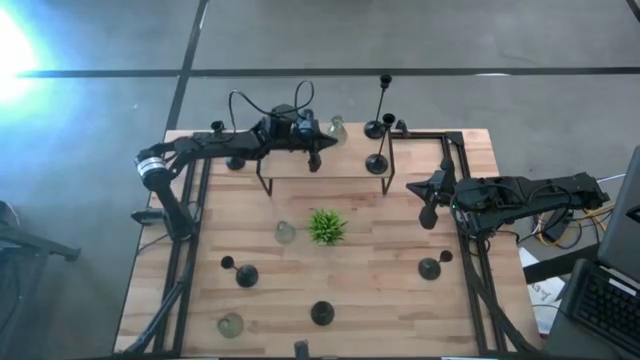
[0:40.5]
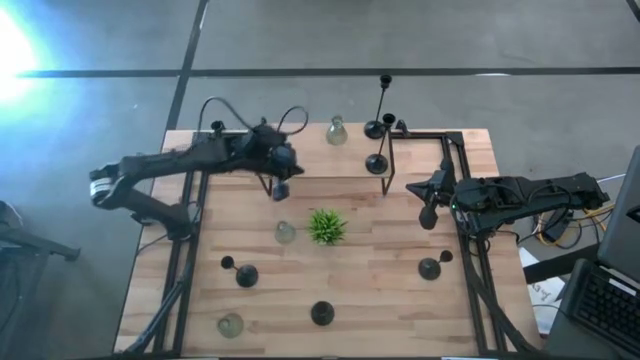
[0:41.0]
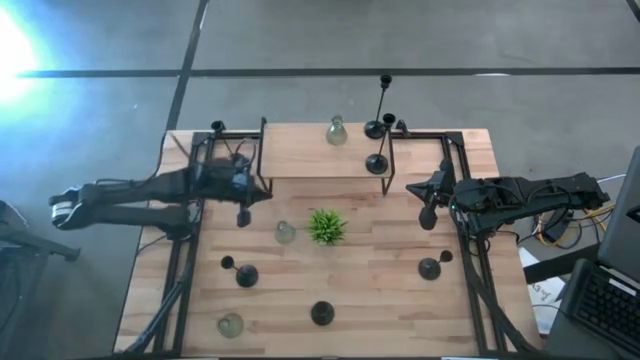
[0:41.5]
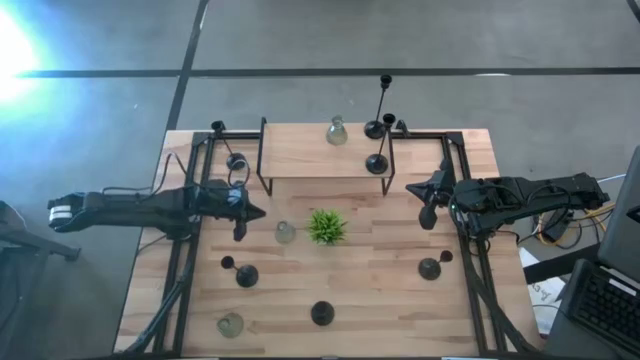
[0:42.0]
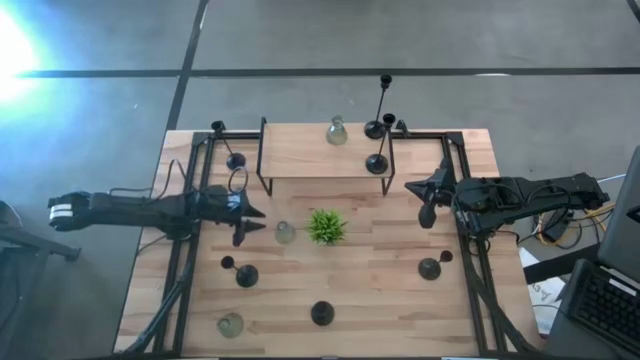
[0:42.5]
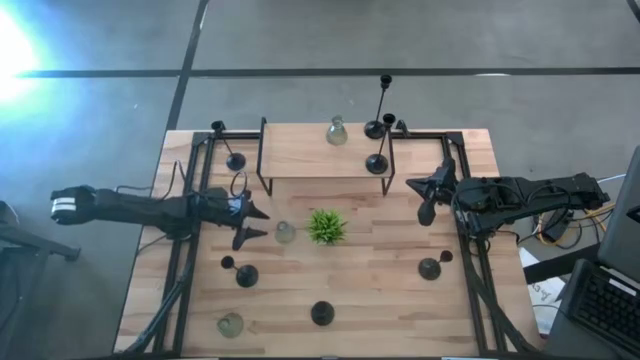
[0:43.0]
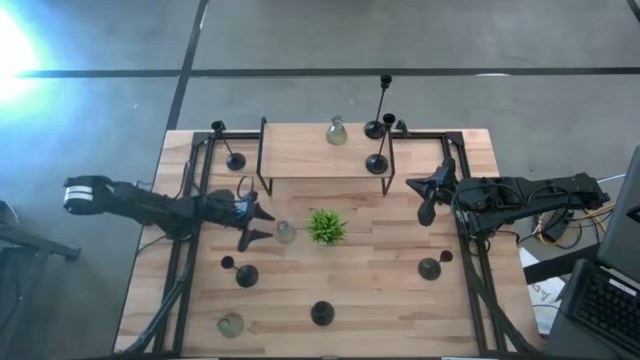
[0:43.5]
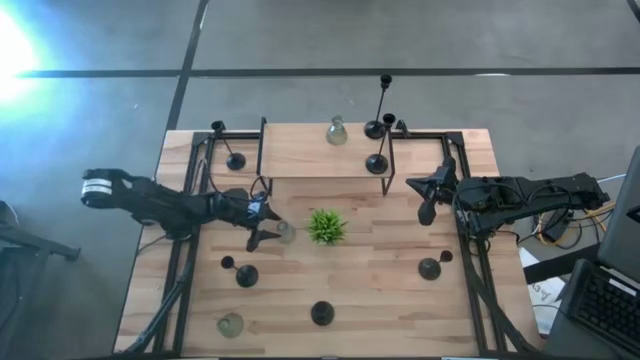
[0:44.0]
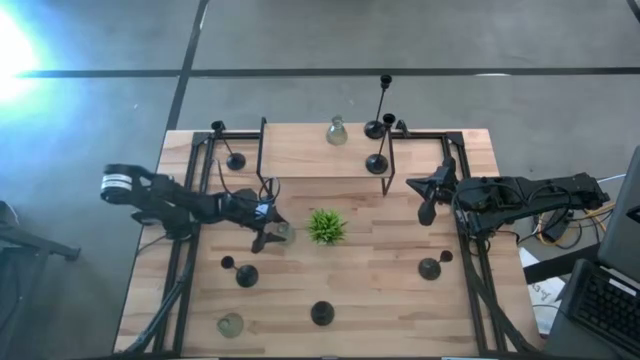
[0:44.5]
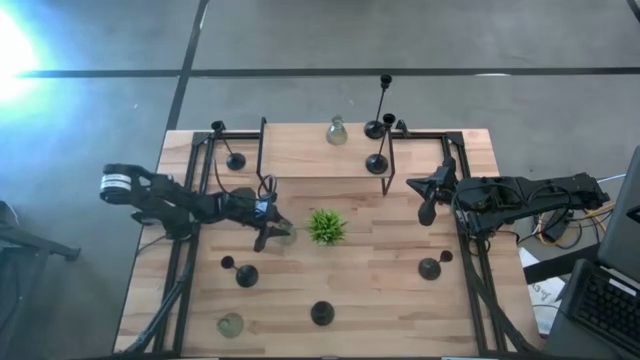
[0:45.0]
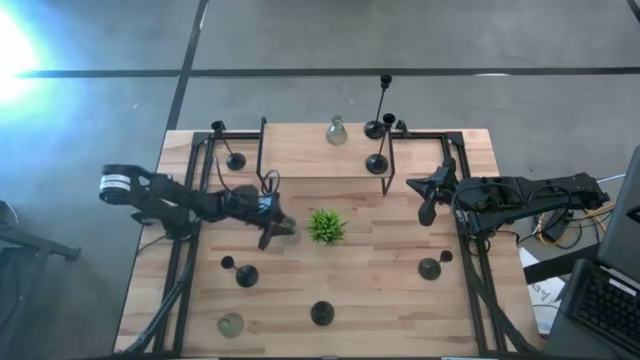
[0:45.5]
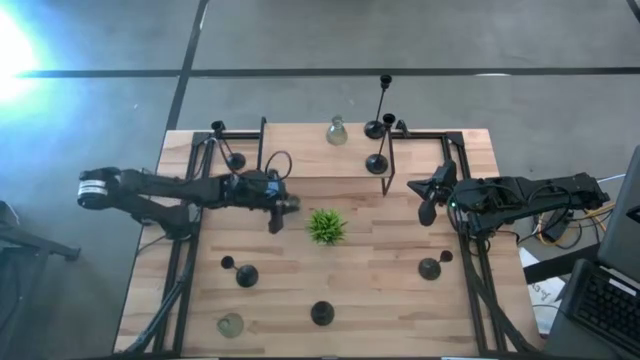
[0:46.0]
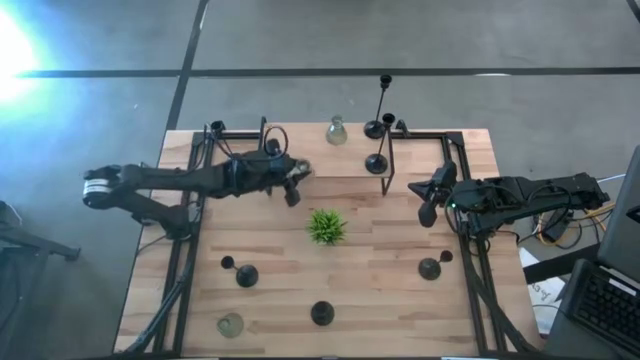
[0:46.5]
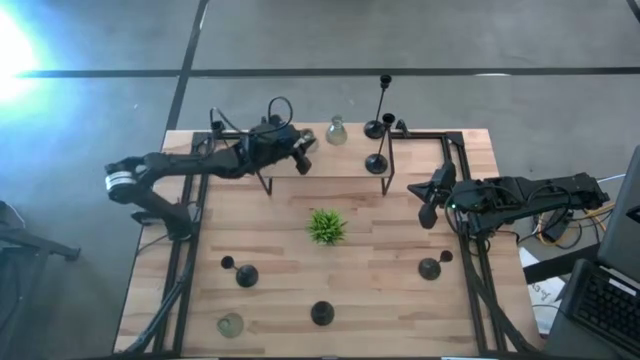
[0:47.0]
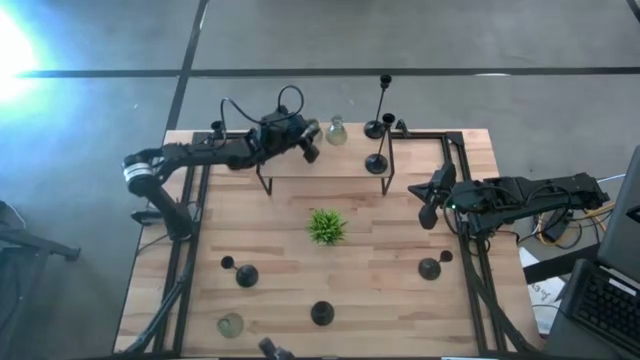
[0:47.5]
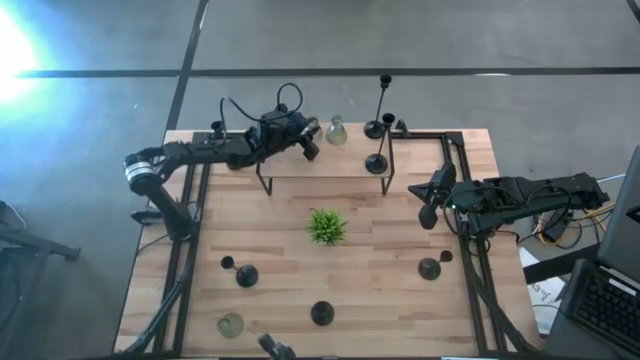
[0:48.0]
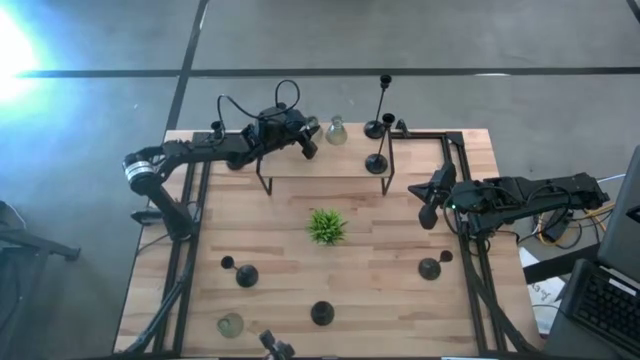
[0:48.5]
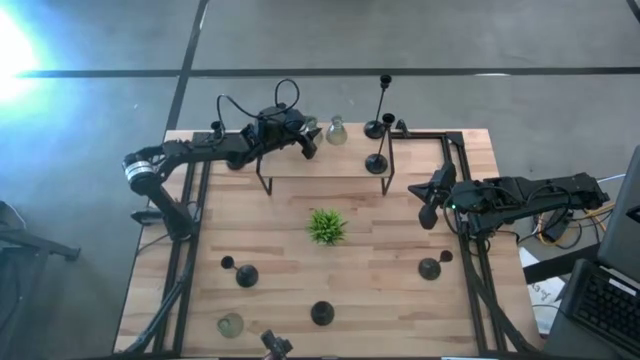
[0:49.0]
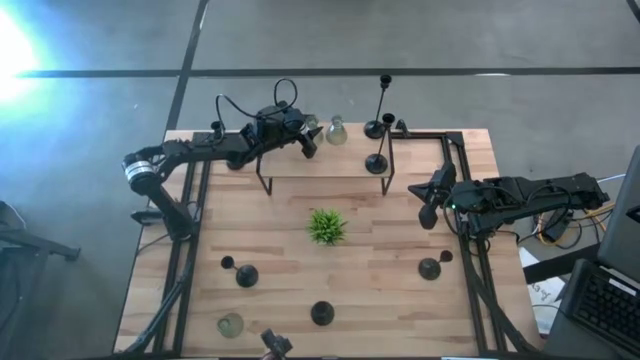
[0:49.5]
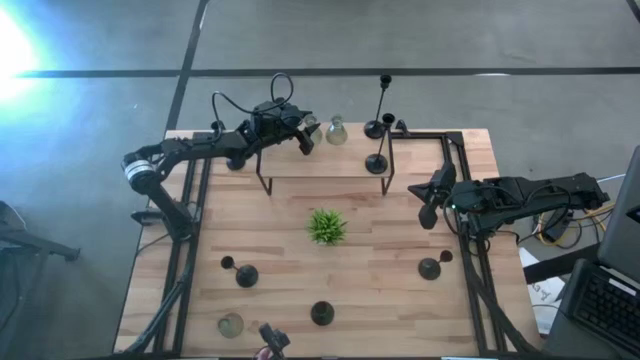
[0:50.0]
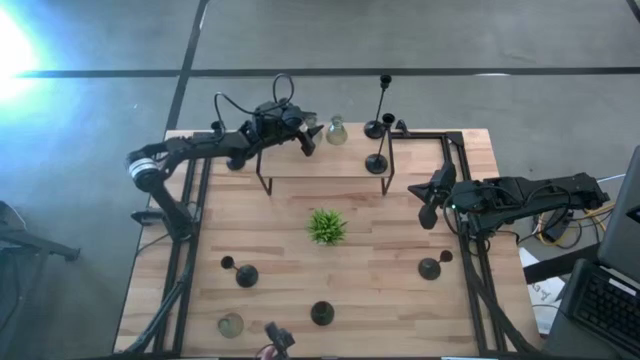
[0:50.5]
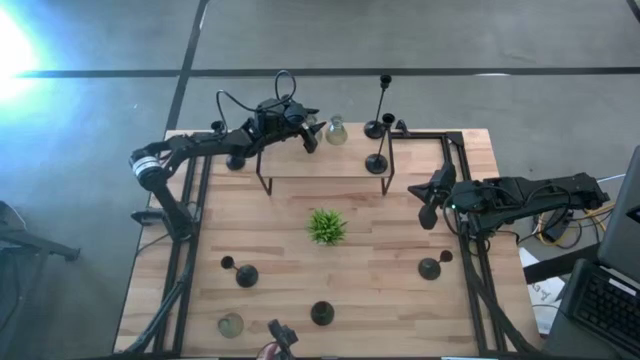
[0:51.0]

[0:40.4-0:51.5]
Task: Pick & Place candle stick holders
Put the top transparent glass candle holder on the shelf

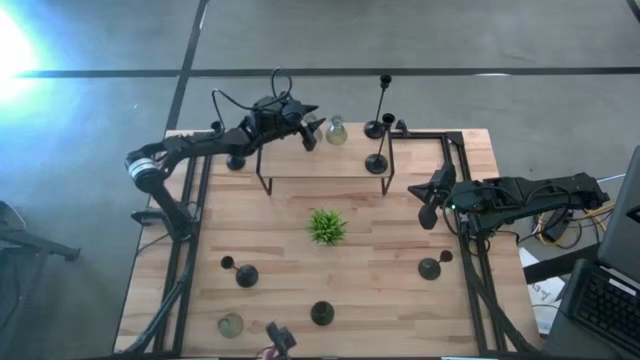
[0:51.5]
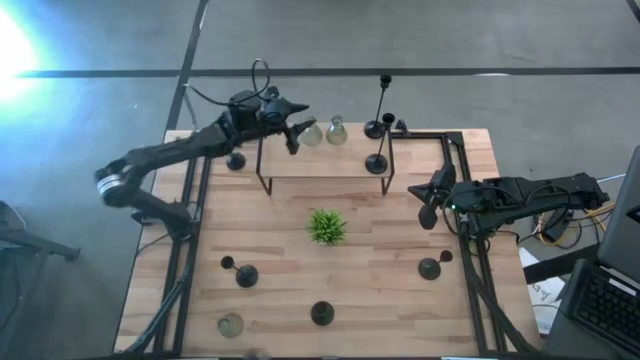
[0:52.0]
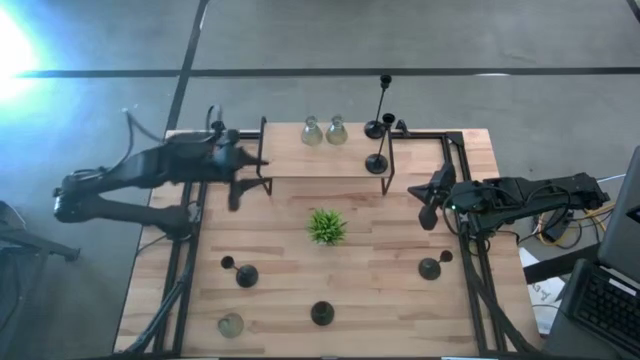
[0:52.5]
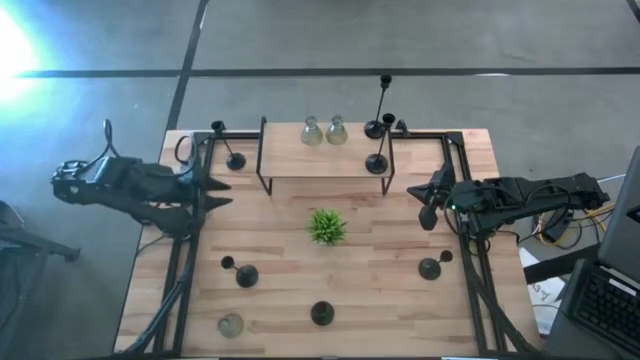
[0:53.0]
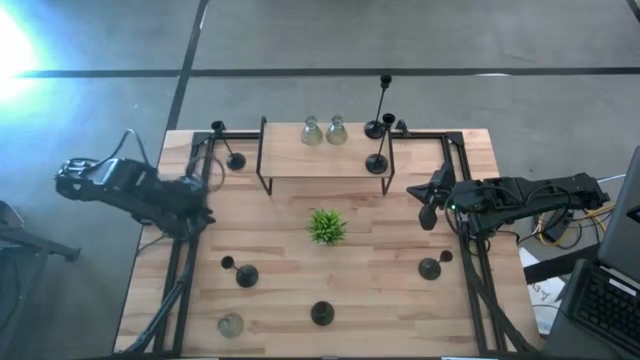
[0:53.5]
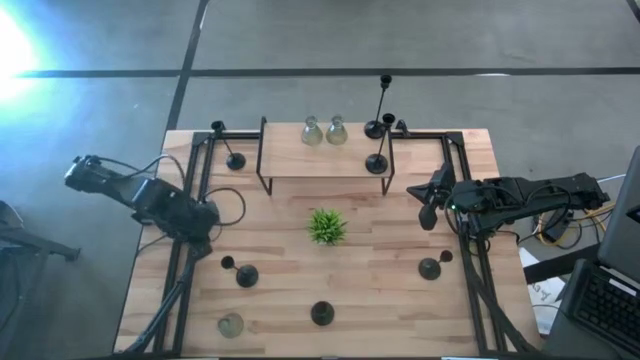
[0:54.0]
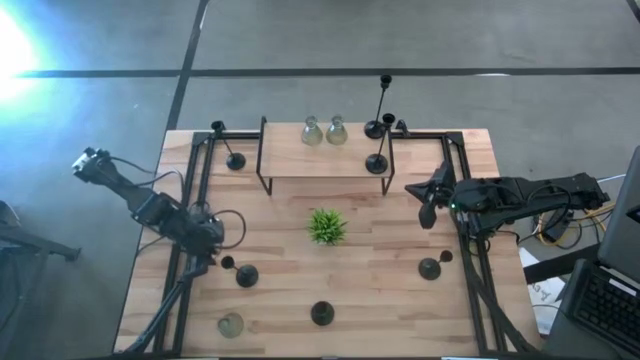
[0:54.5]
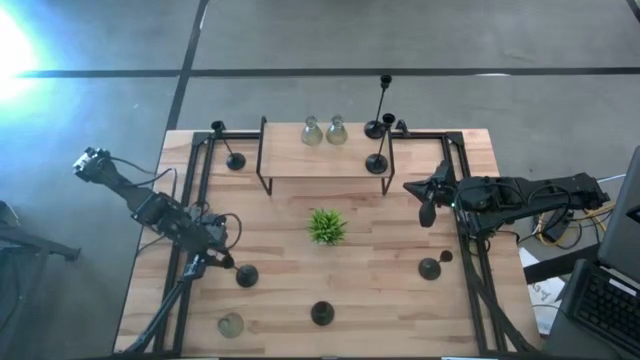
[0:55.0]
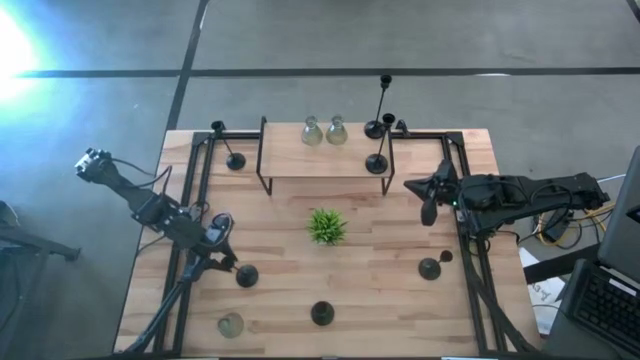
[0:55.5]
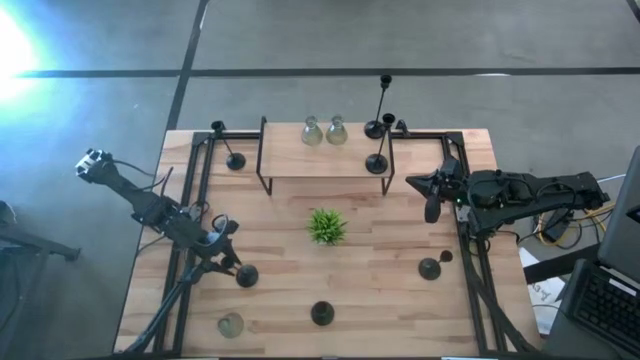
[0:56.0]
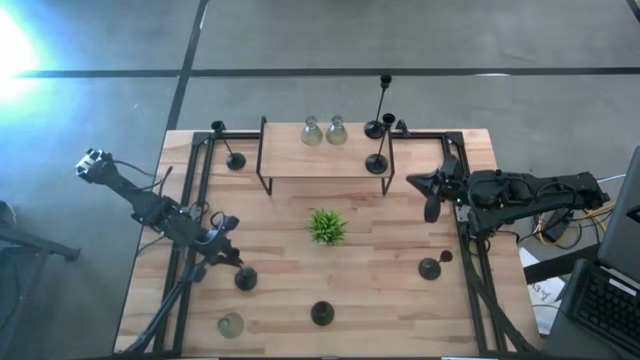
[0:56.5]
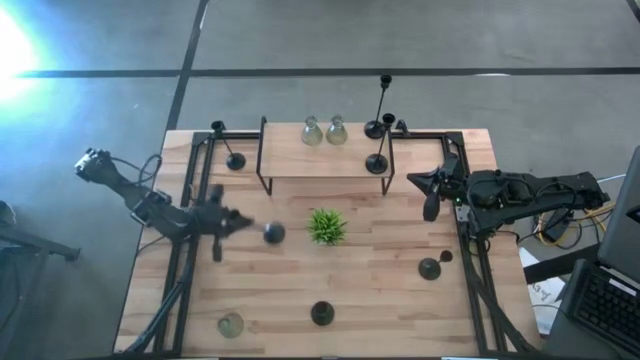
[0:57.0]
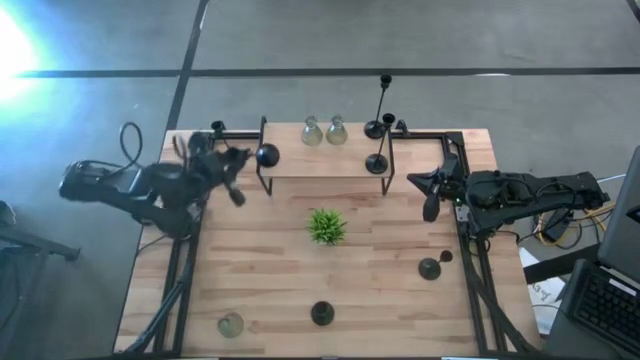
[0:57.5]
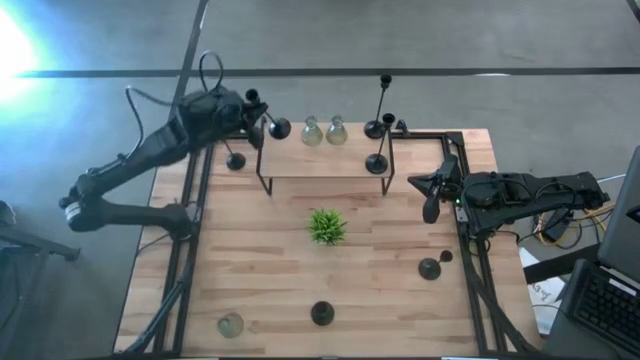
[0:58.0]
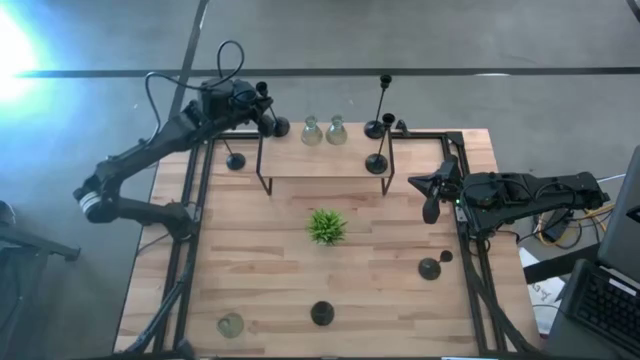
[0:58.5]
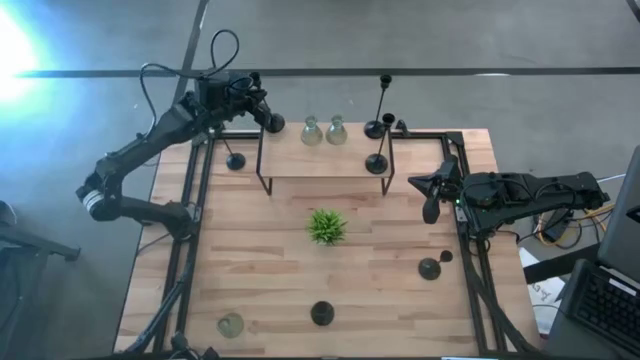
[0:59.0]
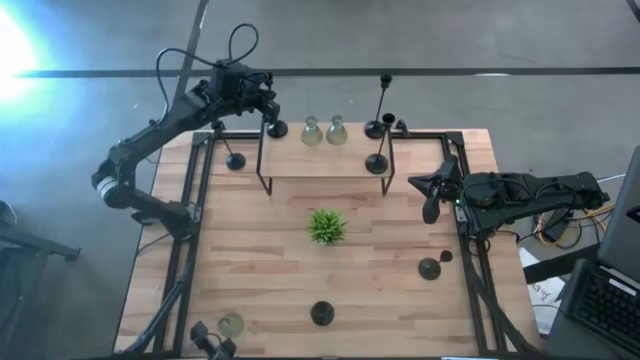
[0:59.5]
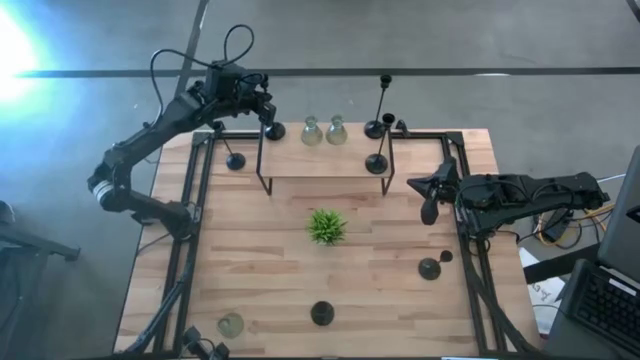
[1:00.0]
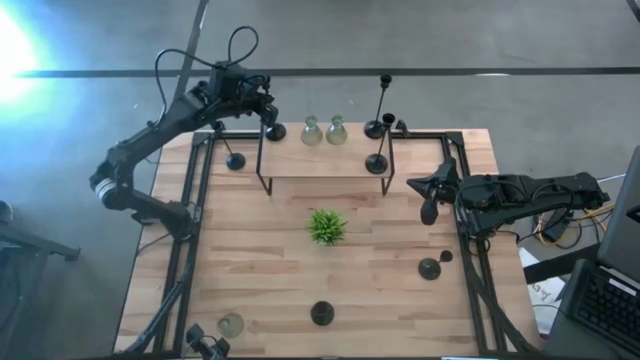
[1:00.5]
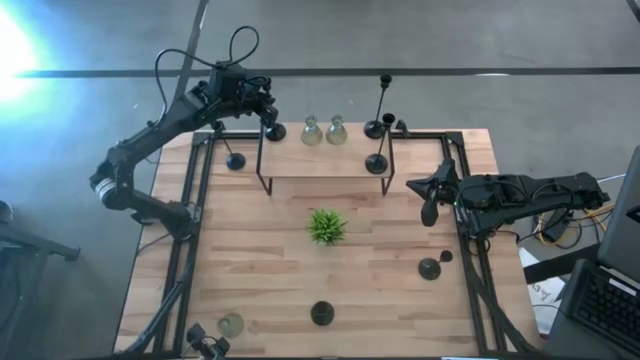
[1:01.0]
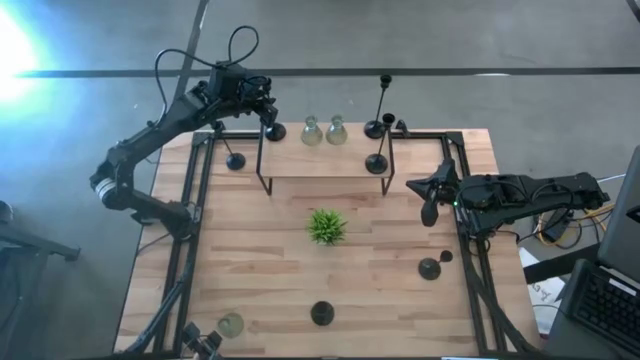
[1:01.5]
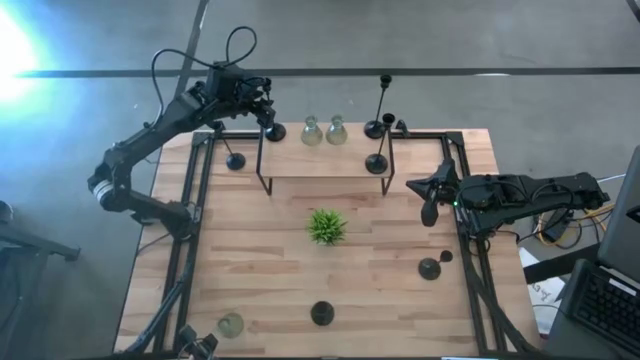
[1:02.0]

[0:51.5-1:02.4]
Put the black candlestick holder on the shelf
